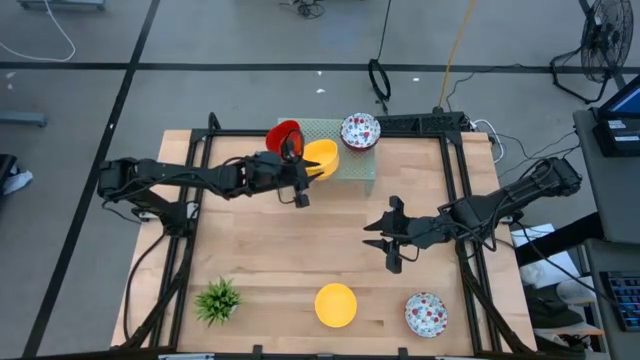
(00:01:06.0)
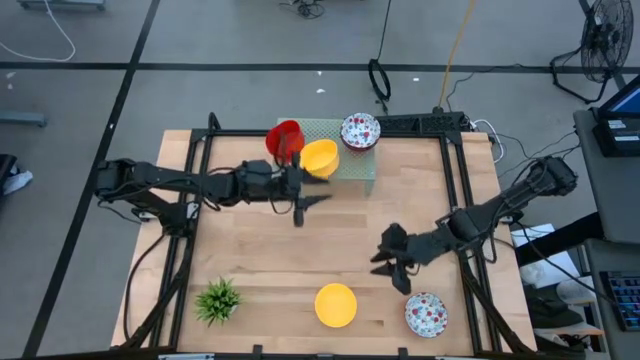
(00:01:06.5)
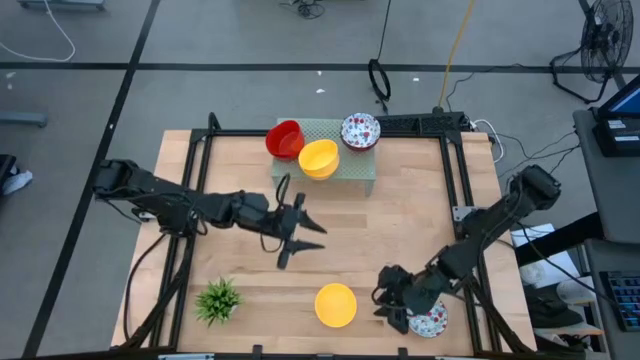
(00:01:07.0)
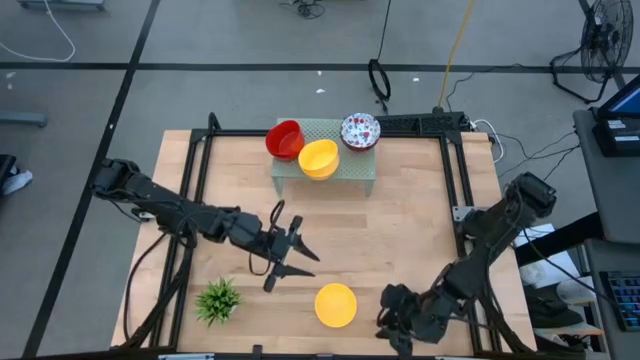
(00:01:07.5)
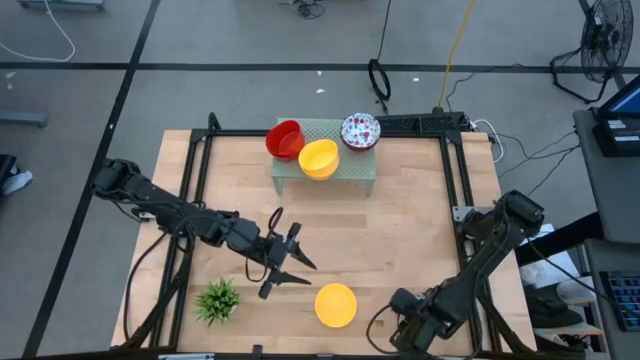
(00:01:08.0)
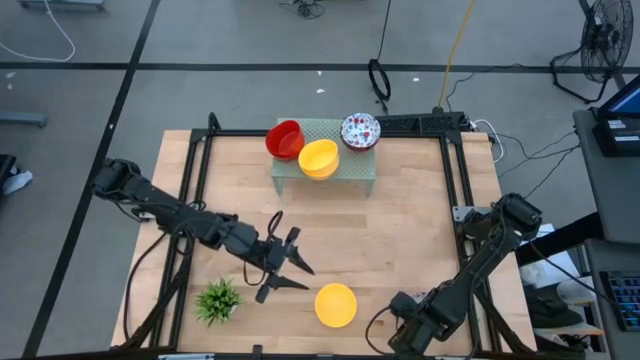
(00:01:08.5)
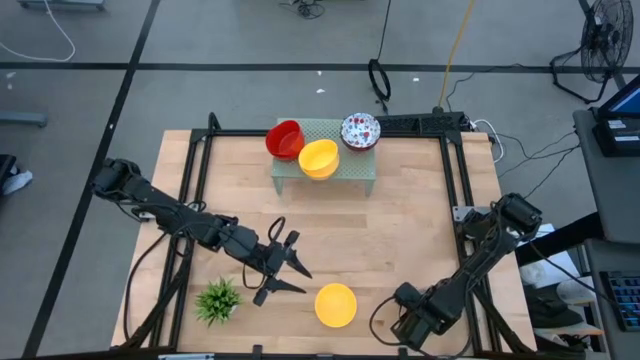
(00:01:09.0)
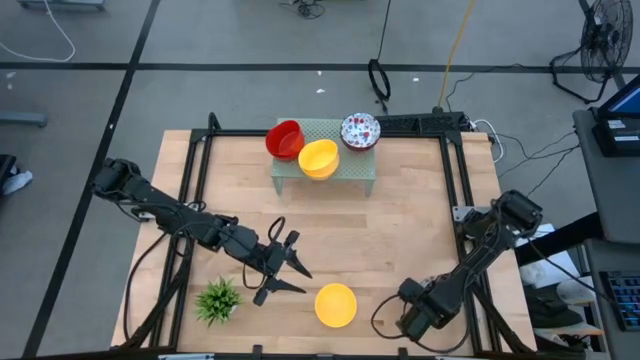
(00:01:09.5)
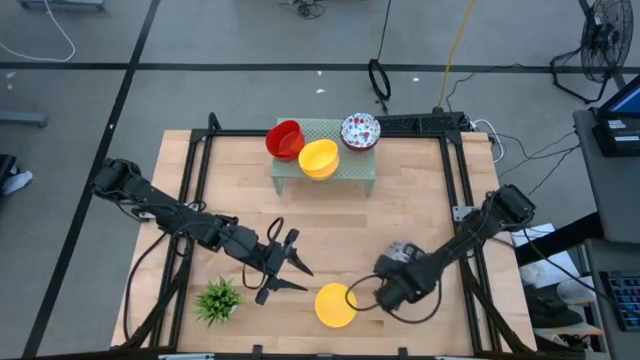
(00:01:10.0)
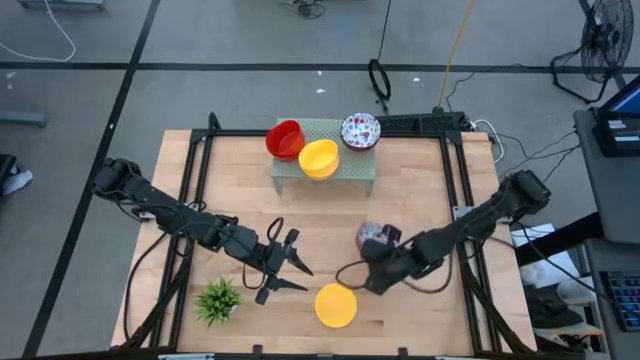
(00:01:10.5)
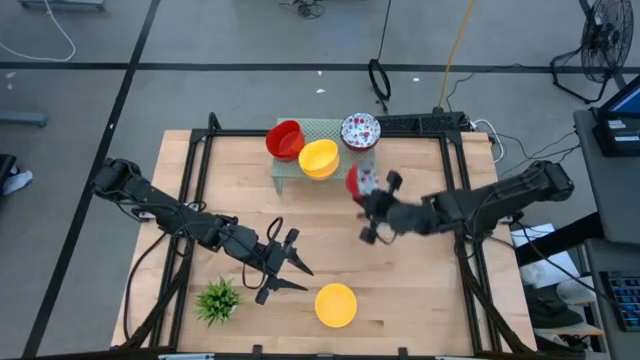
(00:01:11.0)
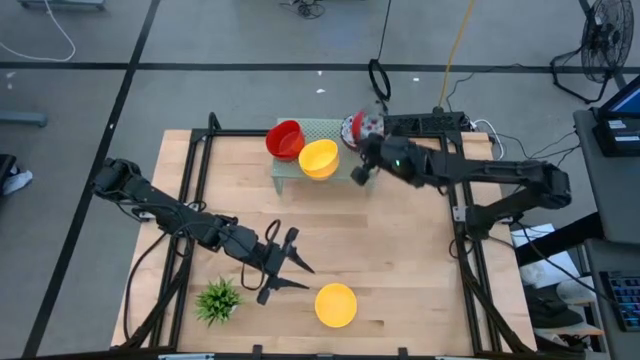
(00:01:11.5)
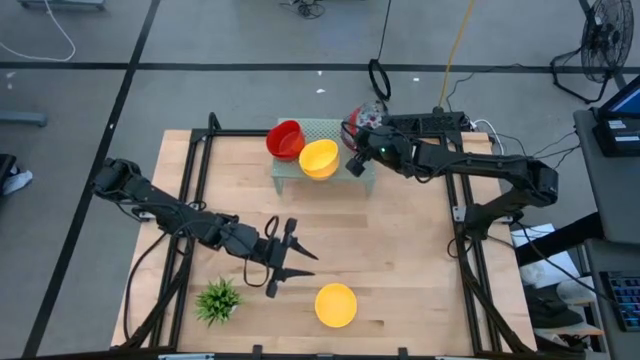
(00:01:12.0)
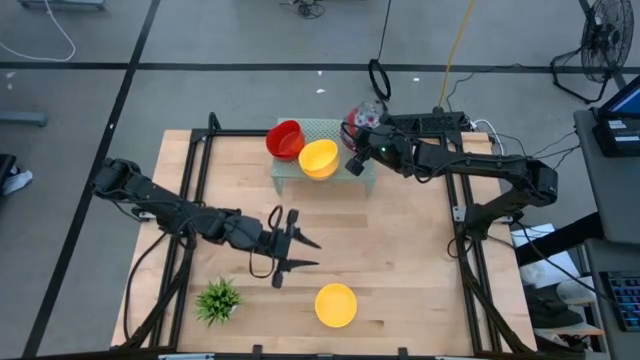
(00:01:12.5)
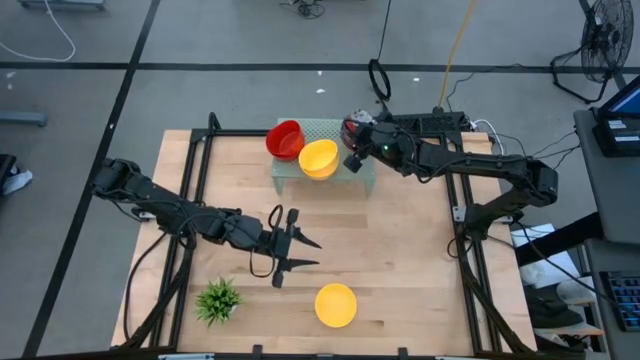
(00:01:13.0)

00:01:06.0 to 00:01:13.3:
Task: Pick & Place Mini bowls
Stack the red patterned bowl on top of the red patterned bowls on the shelf

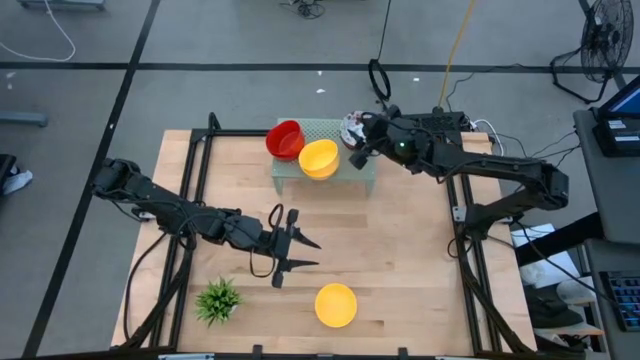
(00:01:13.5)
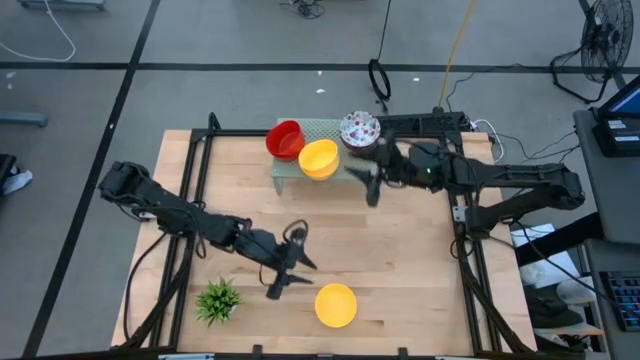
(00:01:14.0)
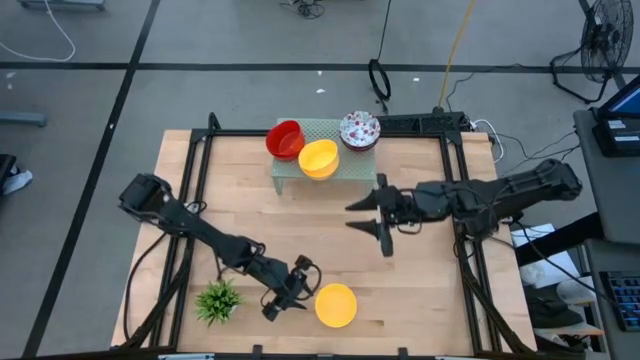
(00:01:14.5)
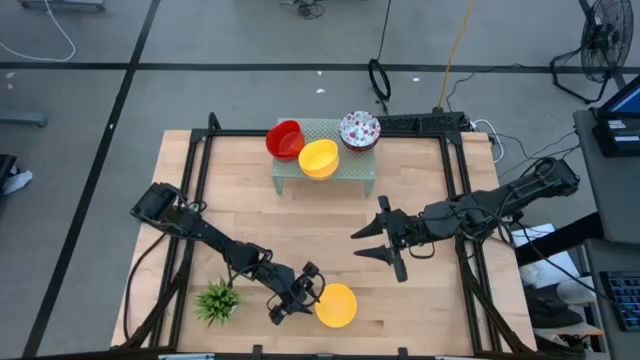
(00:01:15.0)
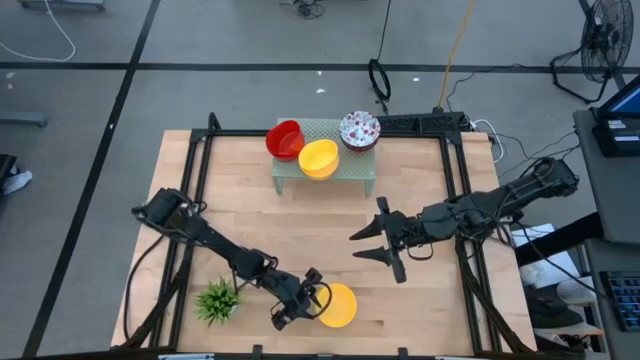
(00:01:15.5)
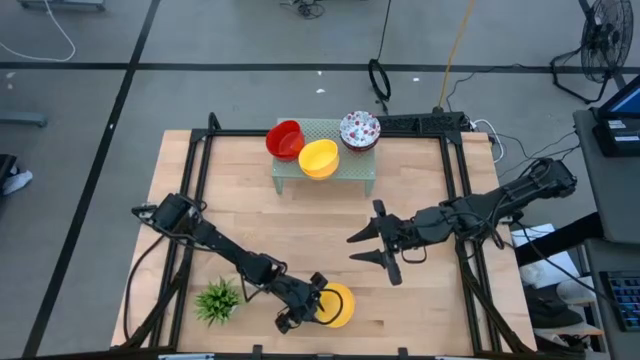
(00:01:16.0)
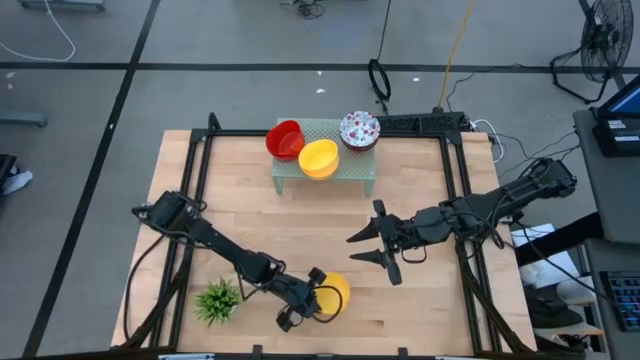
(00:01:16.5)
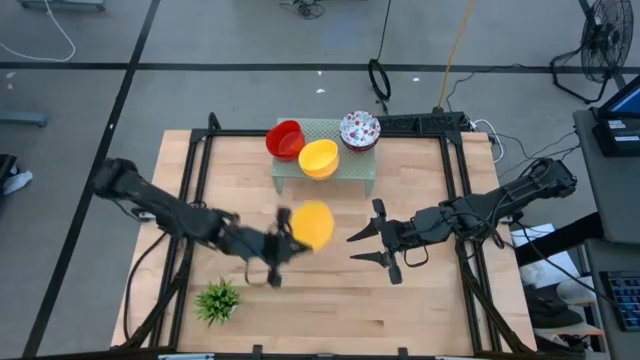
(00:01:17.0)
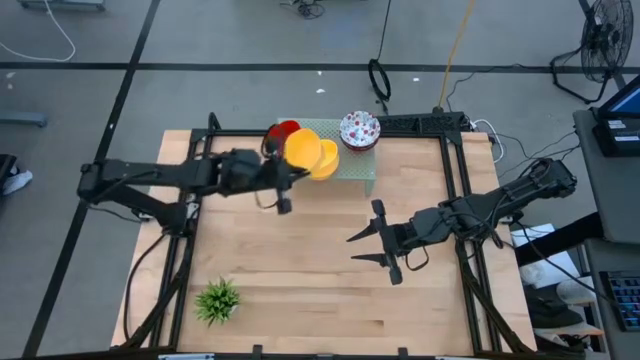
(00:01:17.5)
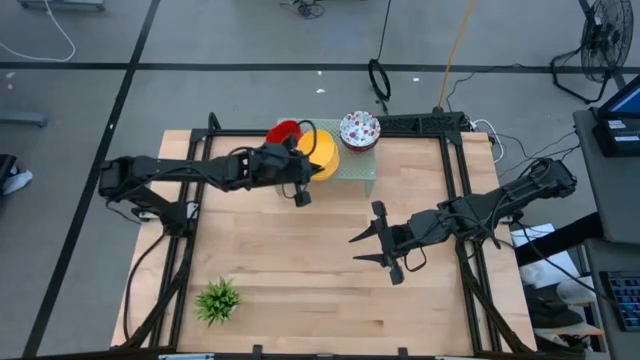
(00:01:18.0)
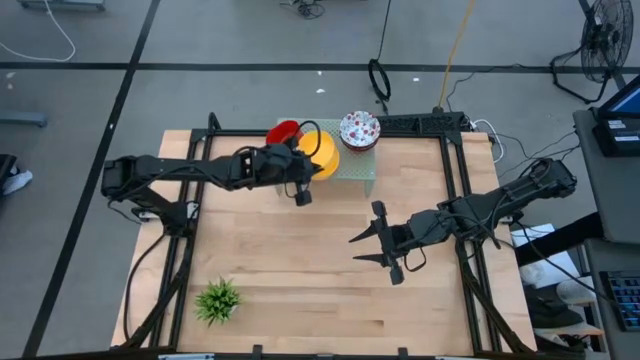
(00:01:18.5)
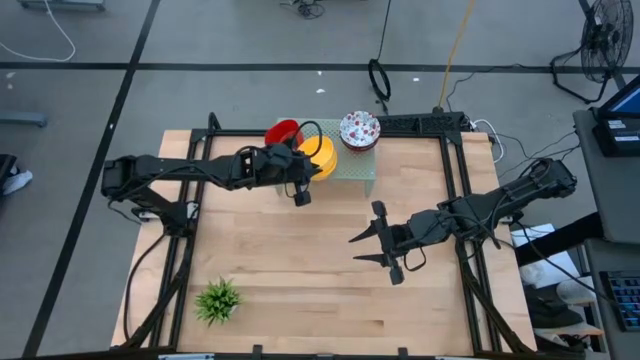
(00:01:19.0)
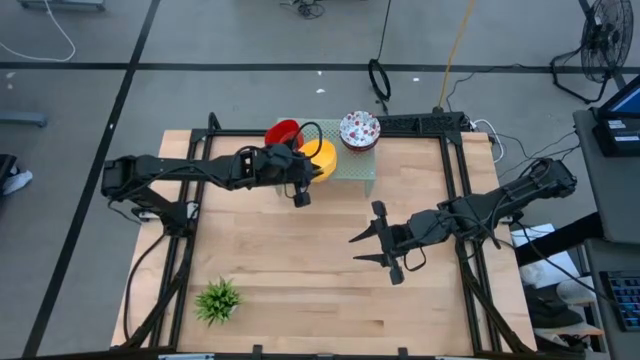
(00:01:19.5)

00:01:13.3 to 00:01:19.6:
Stack the yellow bowl on top of the yellow bowls on the shelf

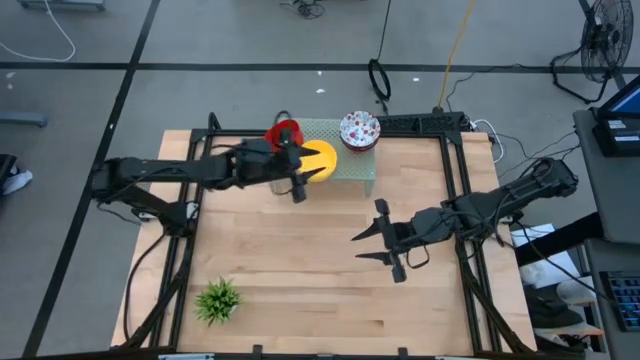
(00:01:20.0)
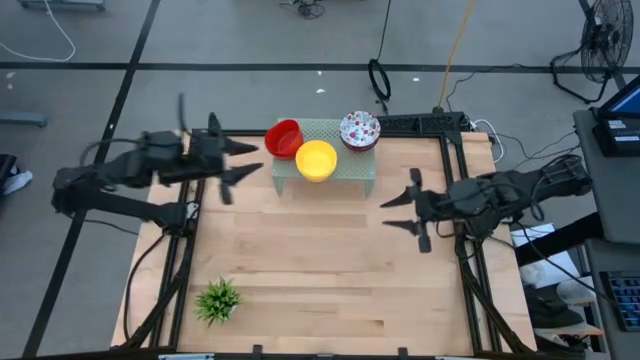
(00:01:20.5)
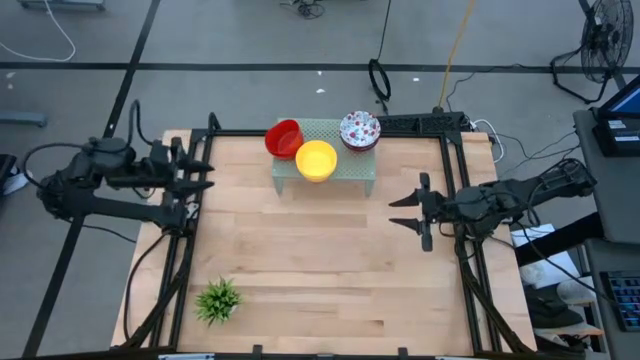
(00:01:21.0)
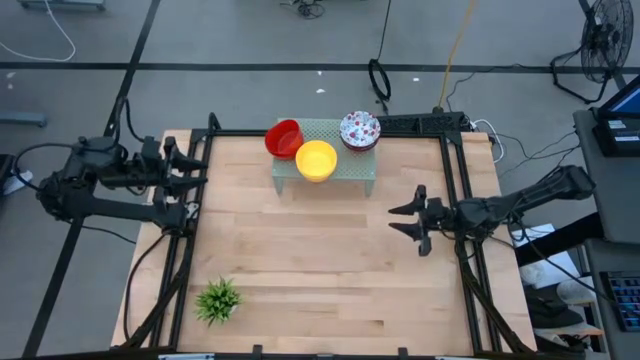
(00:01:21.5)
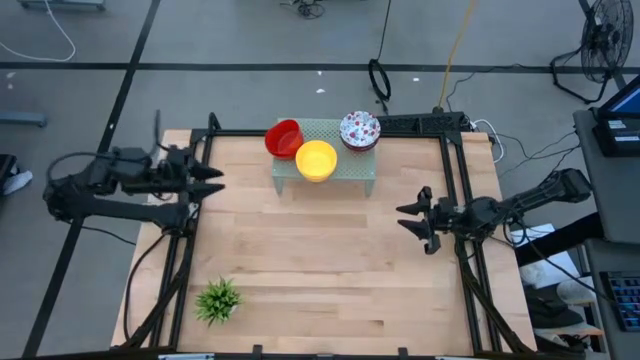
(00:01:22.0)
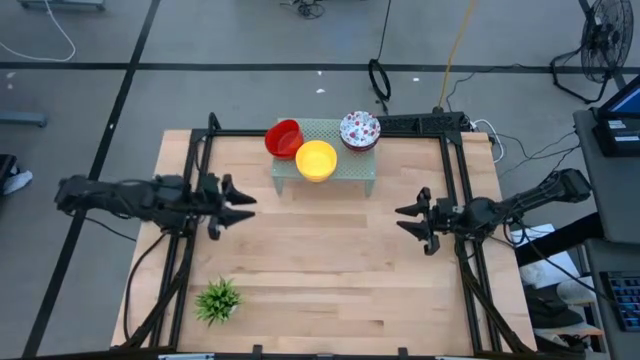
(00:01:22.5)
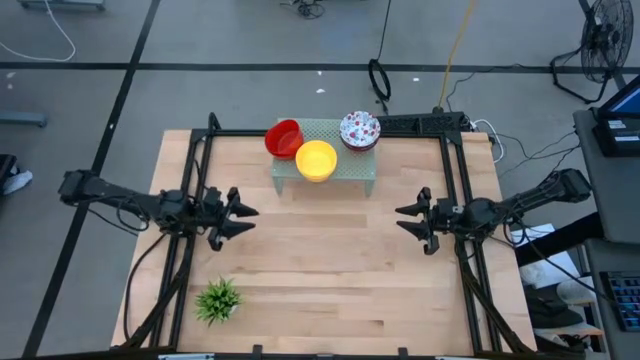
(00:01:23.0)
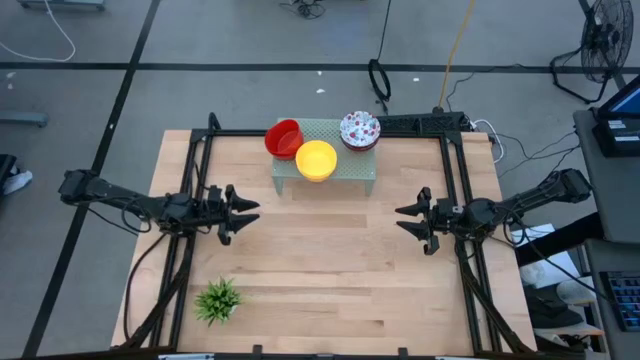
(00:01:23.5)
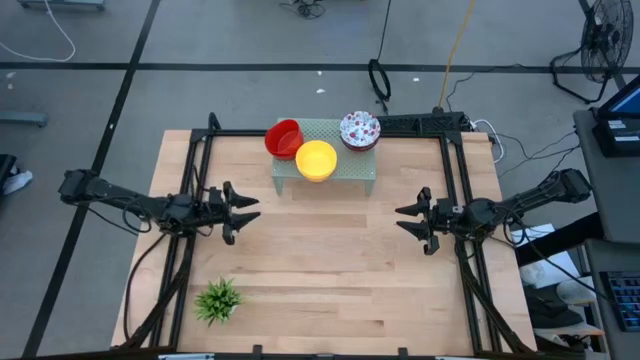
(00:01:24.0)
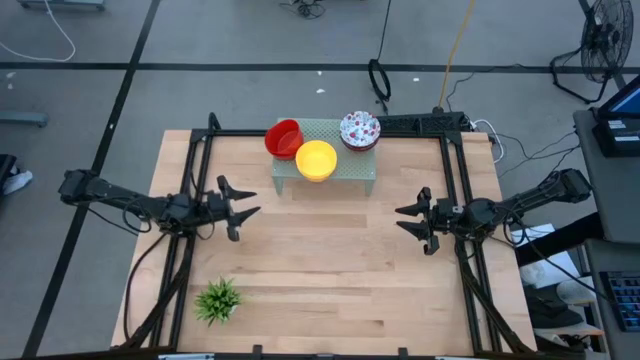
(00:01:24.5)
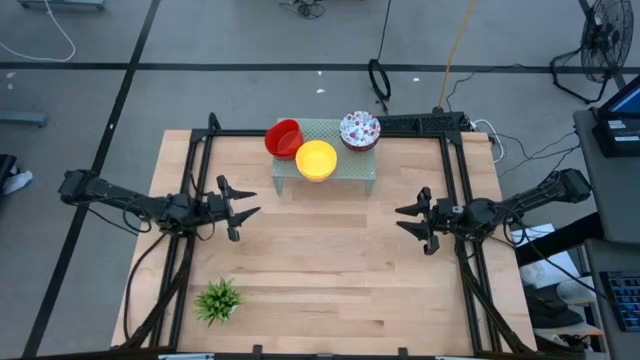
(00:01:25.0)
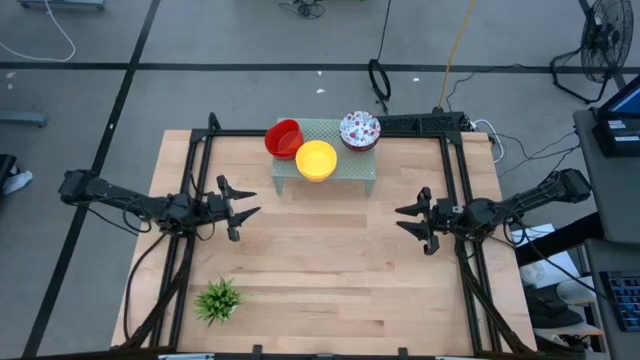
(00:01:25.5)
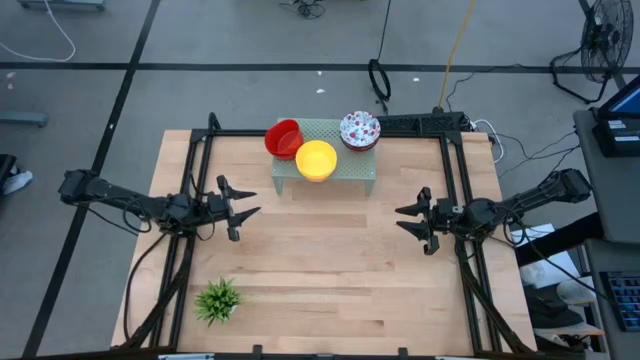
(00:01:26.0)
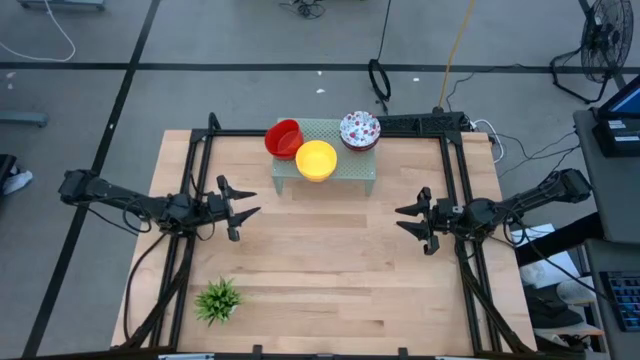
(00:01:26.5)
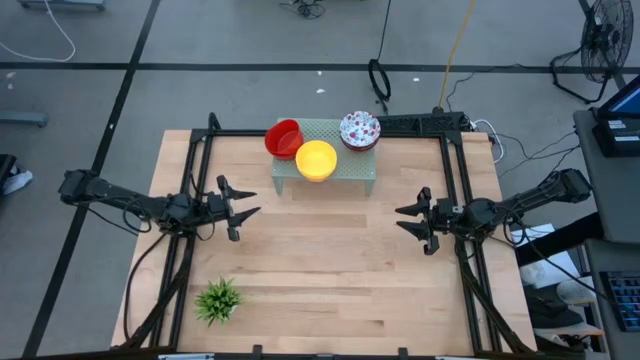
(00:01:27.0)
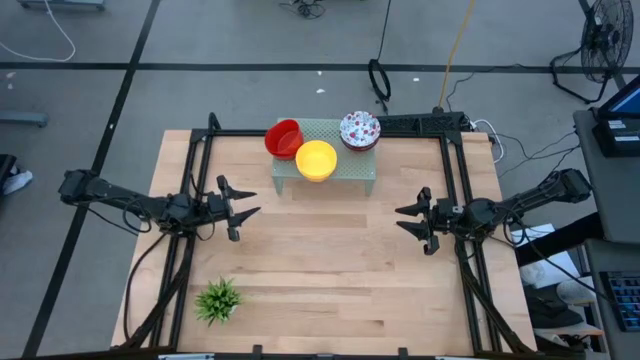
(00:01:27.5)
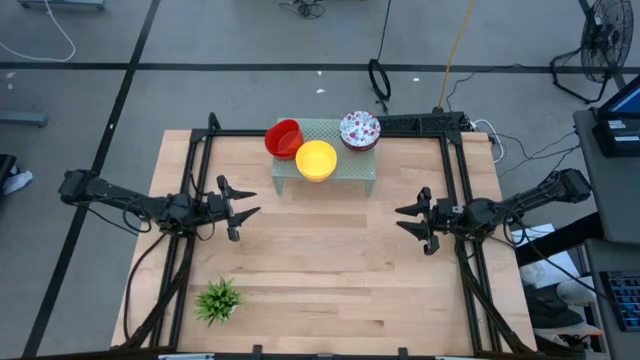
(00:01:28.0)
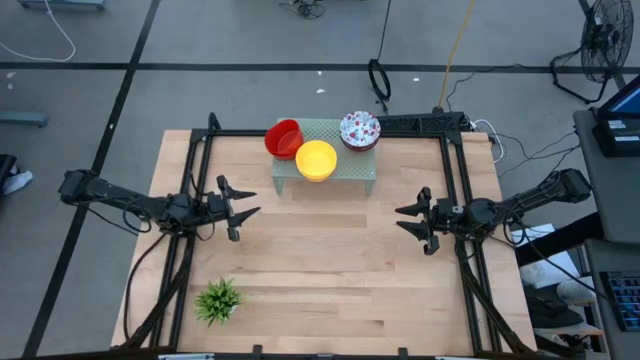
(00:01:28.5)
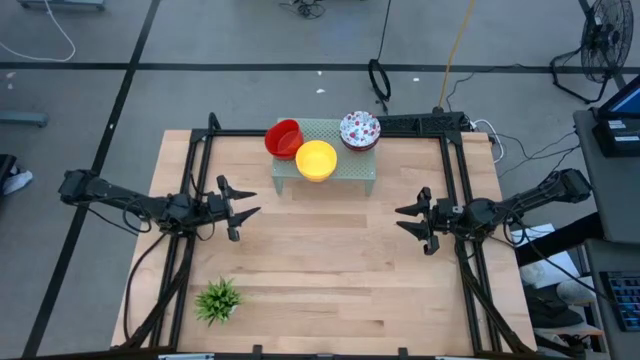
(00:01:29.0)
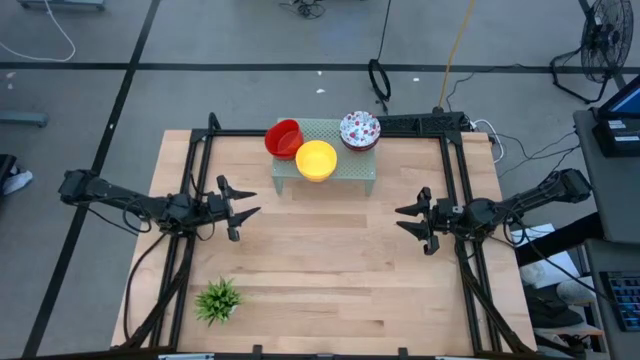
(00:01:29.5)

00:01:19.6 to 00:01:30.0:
Return to Home Position
